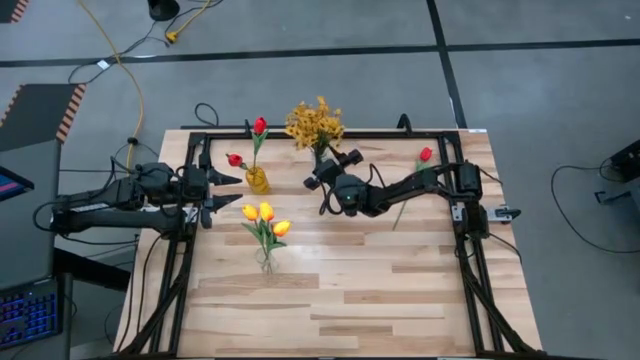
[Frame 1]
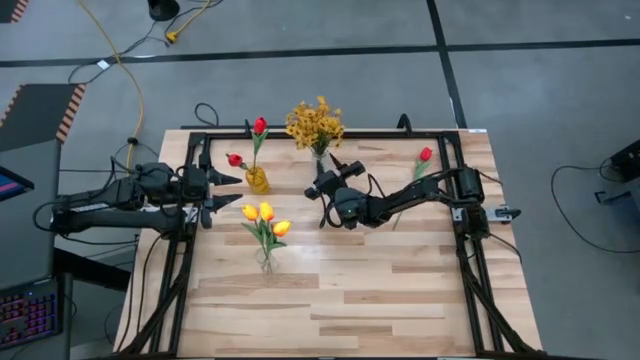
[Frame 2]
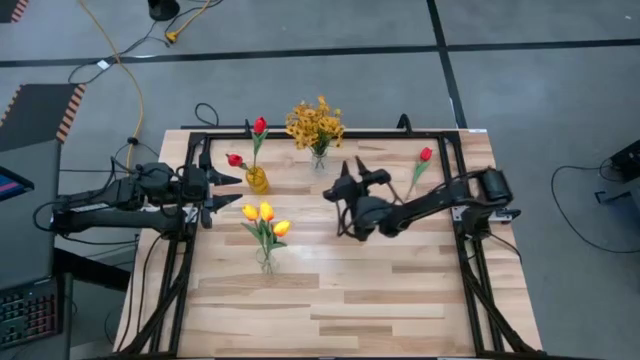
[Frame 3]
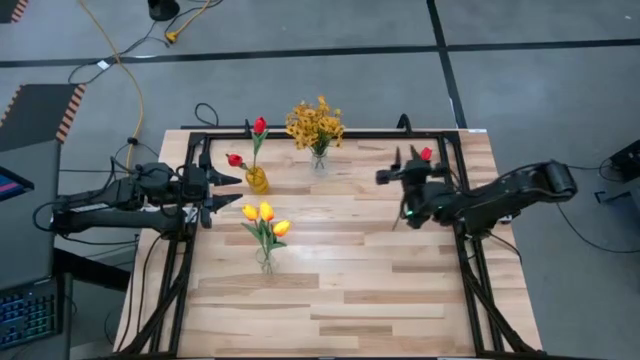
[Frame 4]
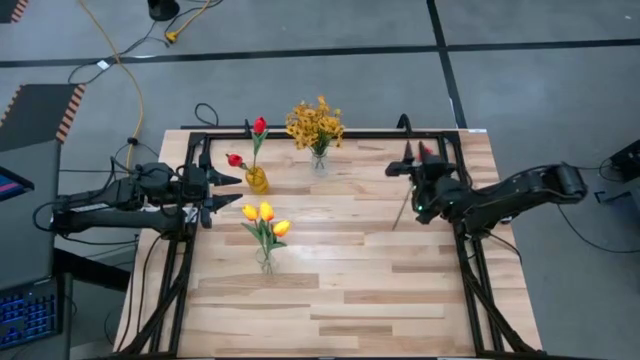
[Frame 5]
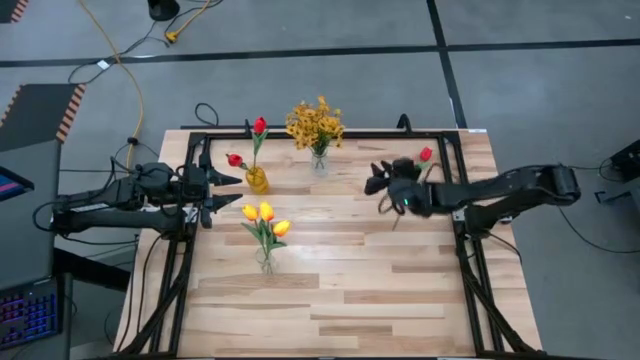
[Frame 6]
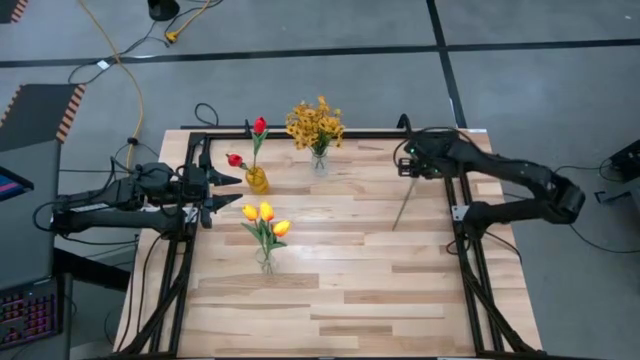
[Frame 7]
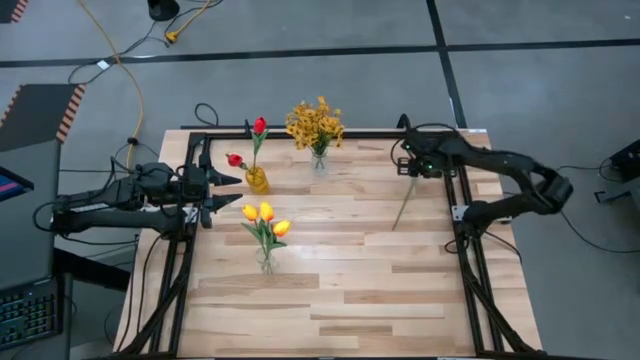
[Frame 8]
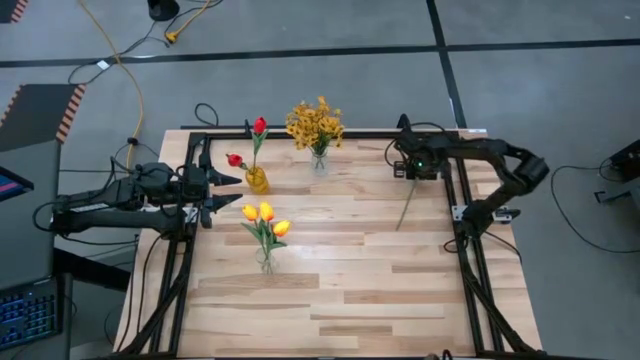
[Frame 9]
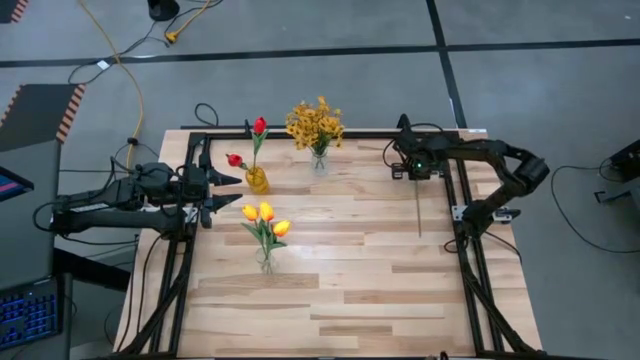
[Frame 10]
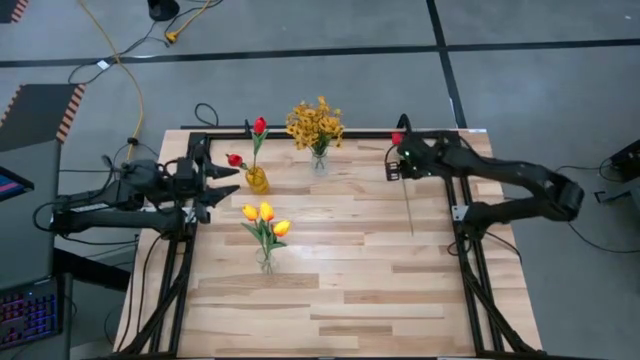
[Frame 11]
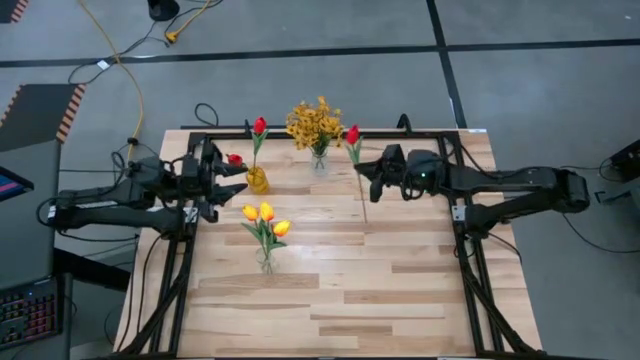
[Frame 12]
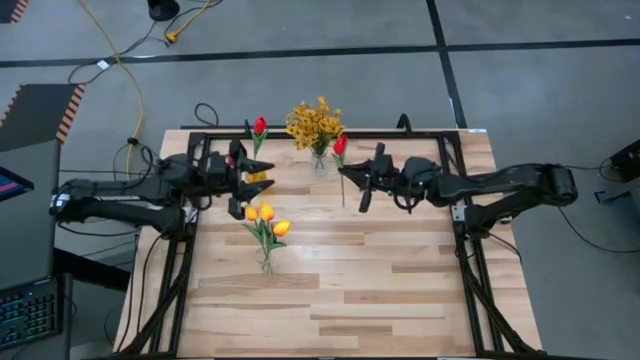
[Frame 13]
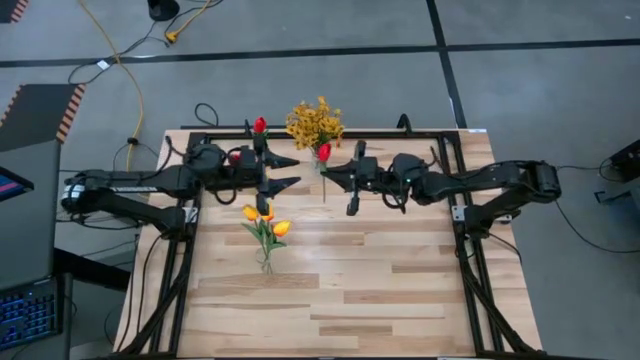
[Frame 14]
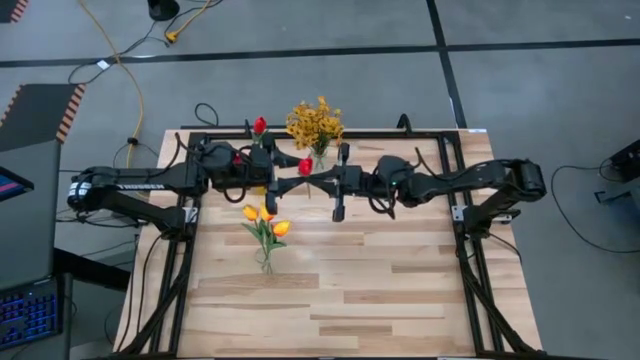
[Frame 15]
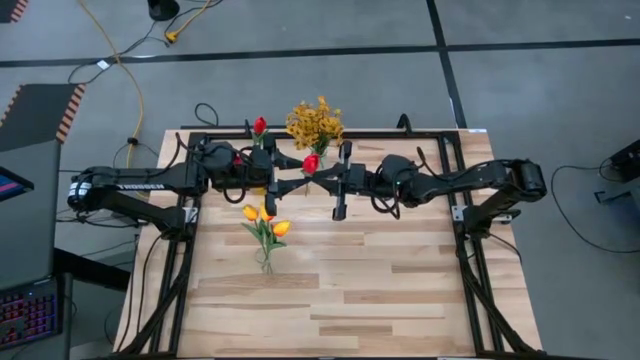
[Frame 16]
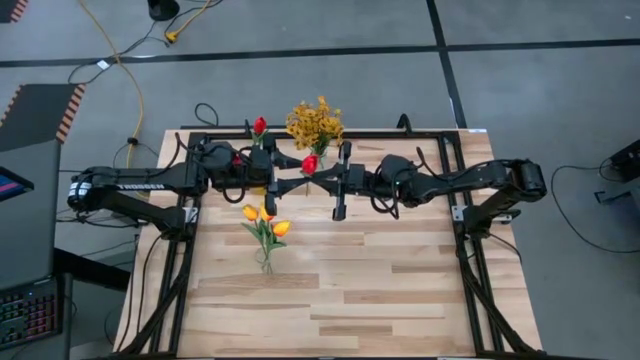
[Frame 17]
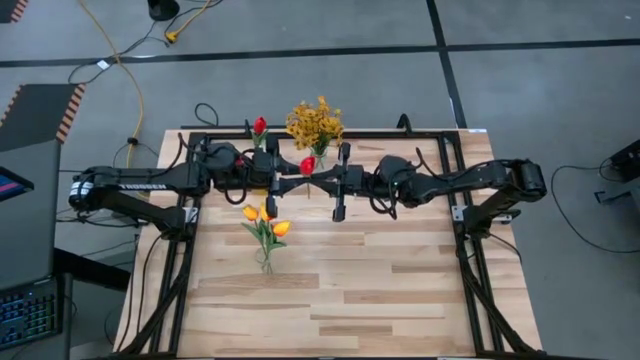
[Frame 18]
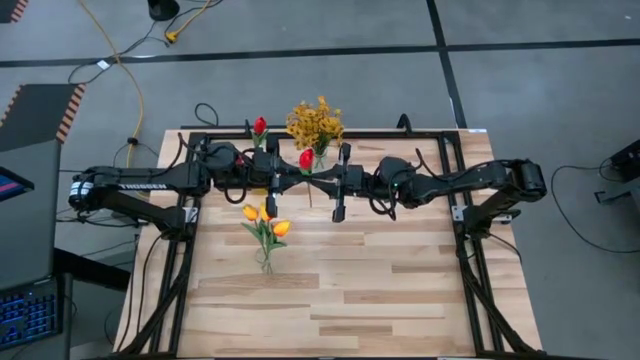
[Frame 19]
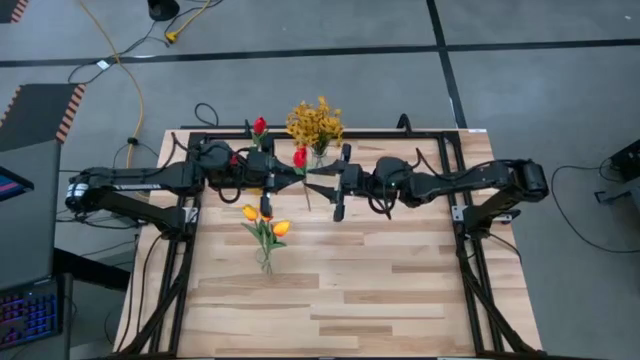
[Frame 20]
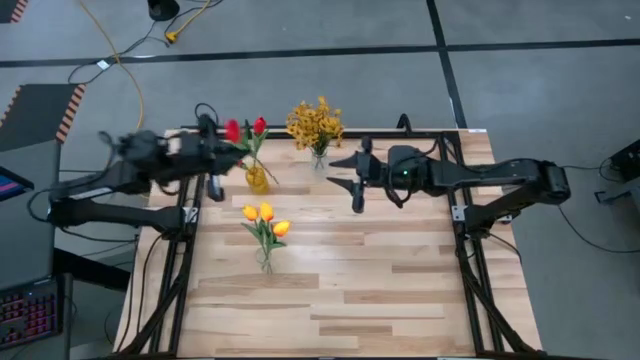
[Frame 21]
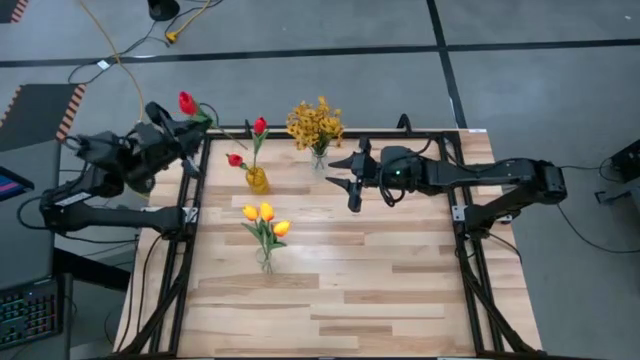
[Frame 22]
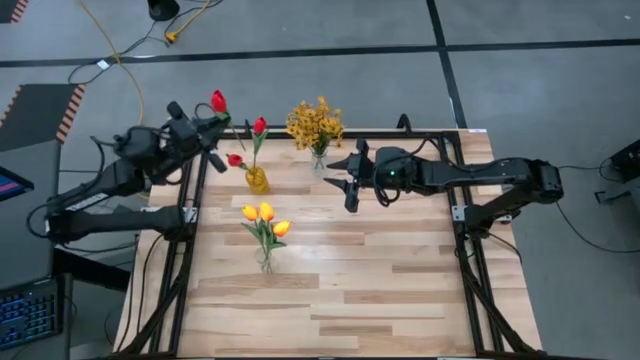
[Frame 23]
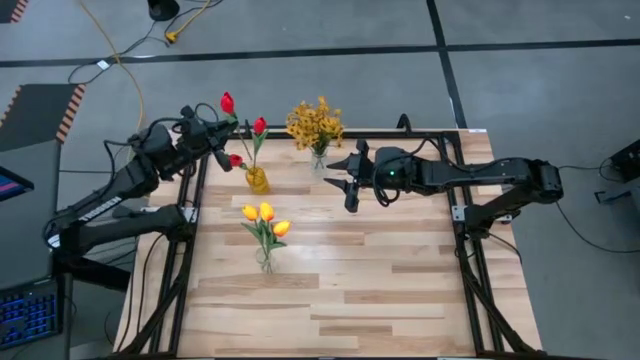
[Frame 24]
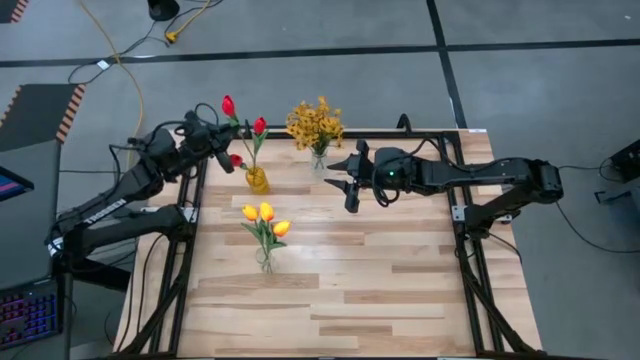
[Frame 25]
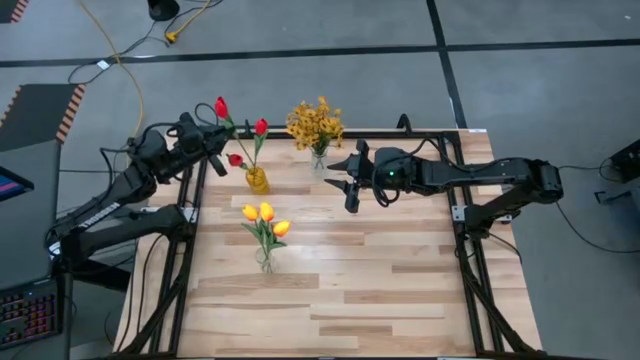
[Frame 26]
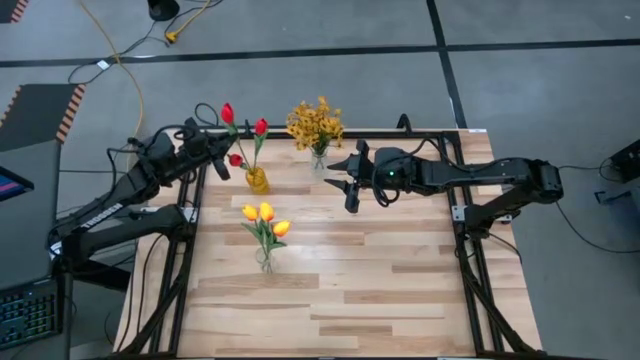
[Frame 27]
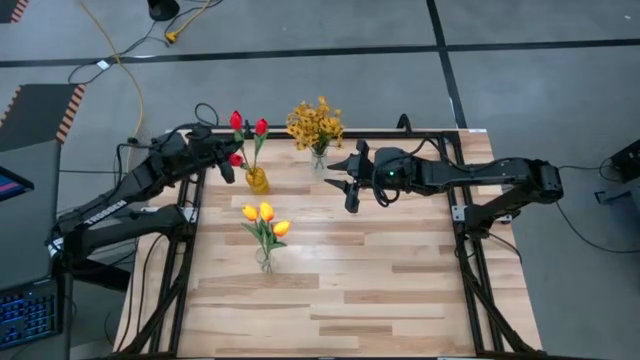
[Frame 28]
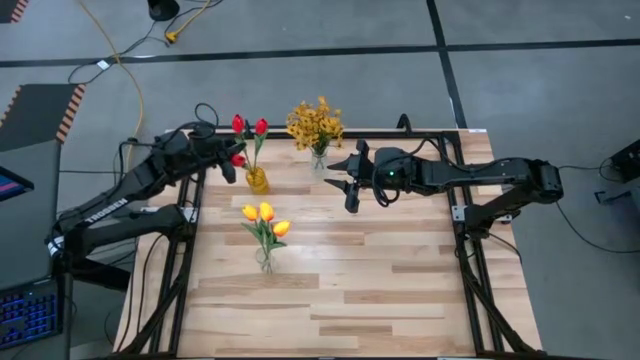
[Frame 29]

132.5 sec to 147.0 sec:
Task: Sort flowers into vase by color
Put the red flower into the yellow vase

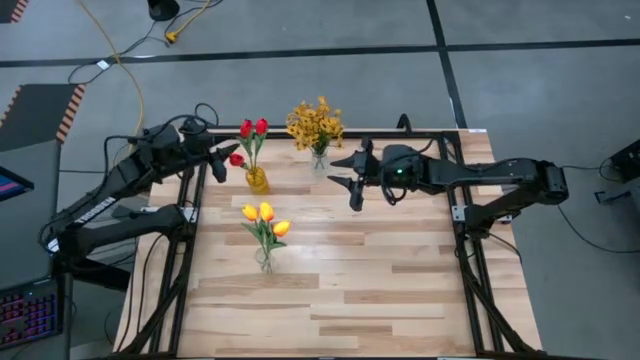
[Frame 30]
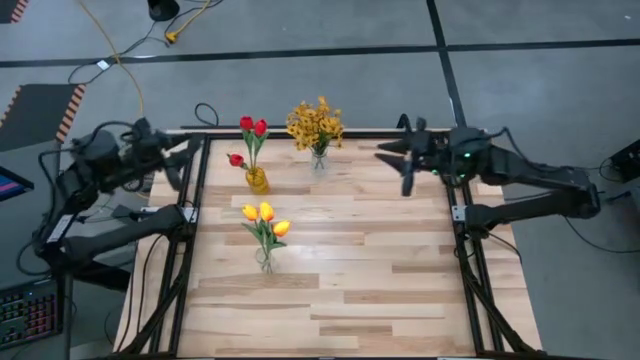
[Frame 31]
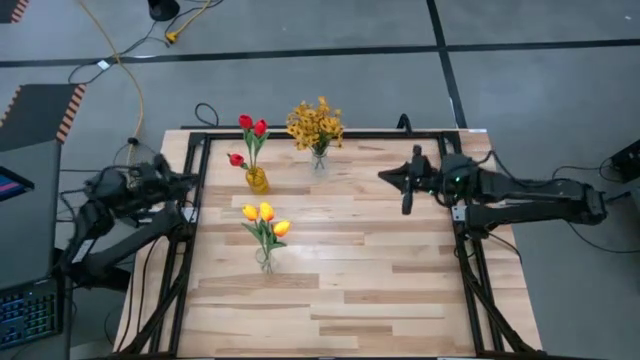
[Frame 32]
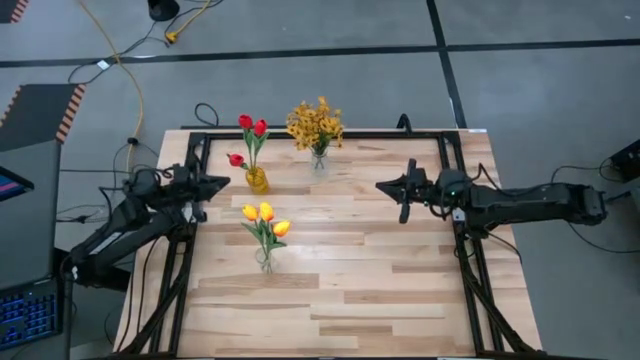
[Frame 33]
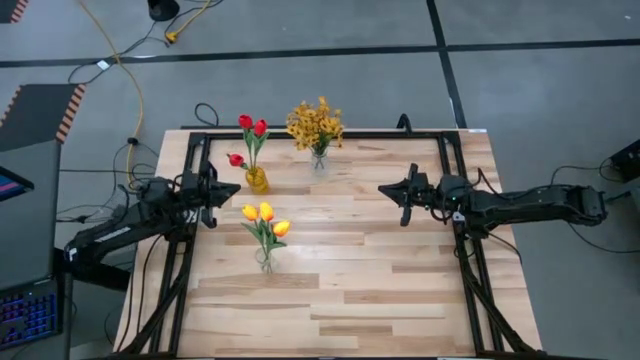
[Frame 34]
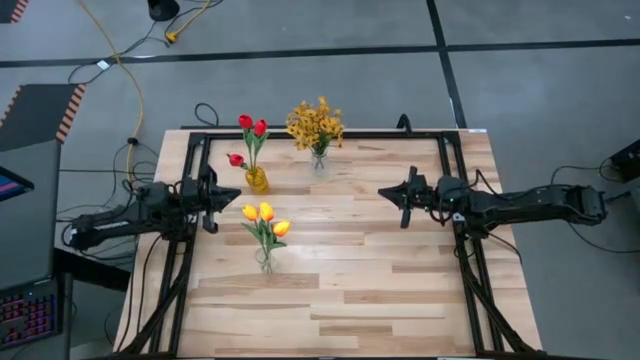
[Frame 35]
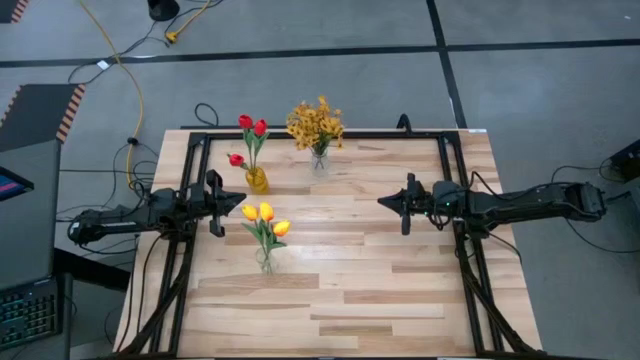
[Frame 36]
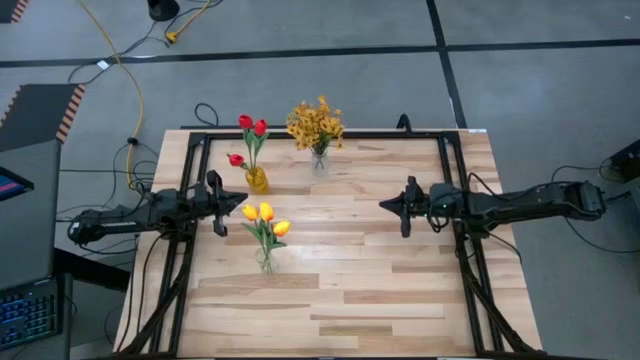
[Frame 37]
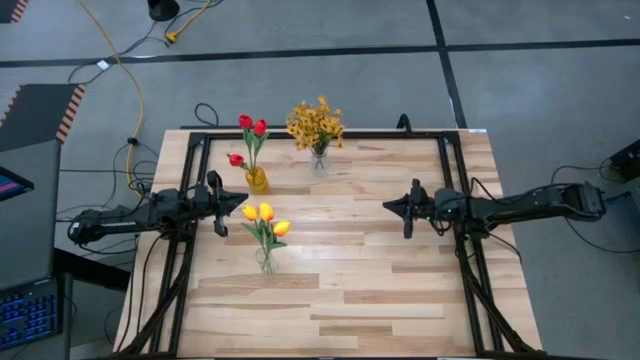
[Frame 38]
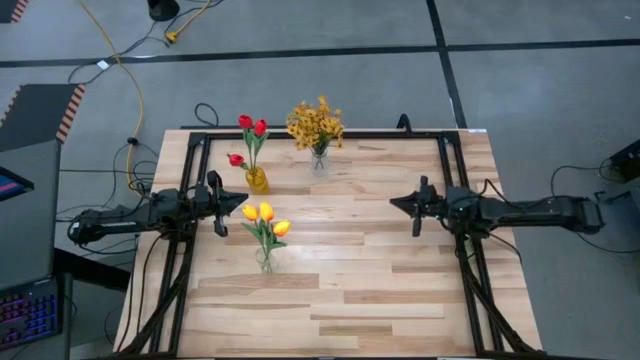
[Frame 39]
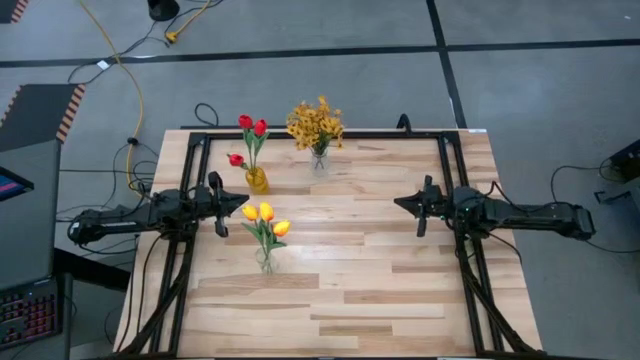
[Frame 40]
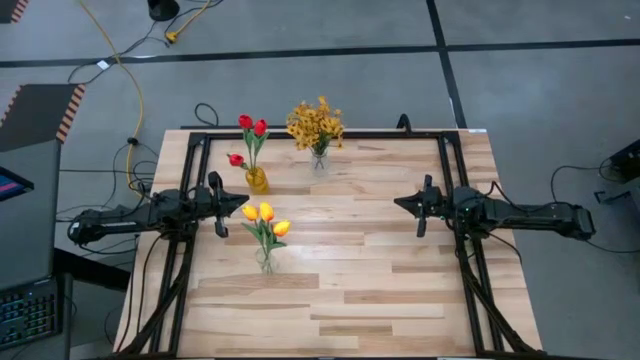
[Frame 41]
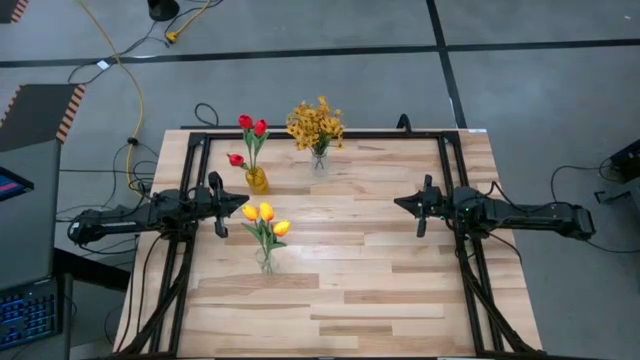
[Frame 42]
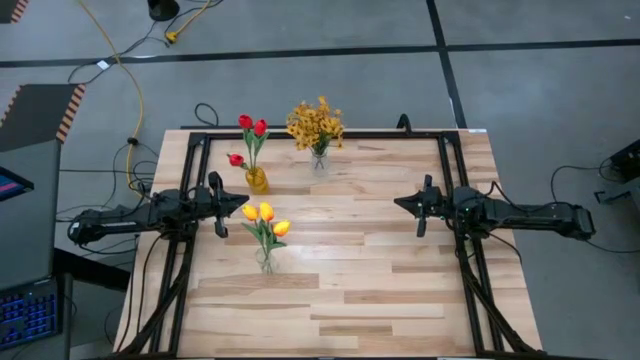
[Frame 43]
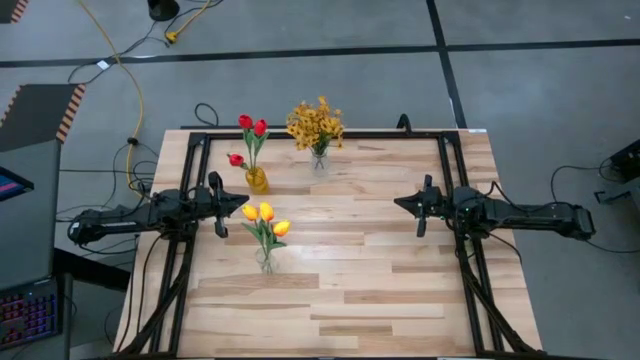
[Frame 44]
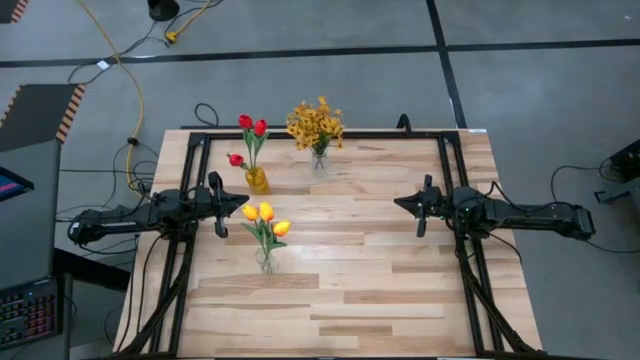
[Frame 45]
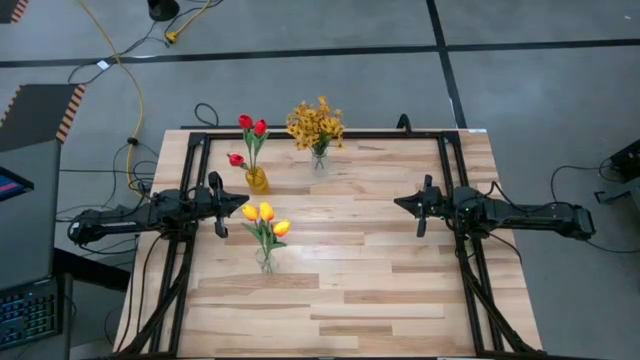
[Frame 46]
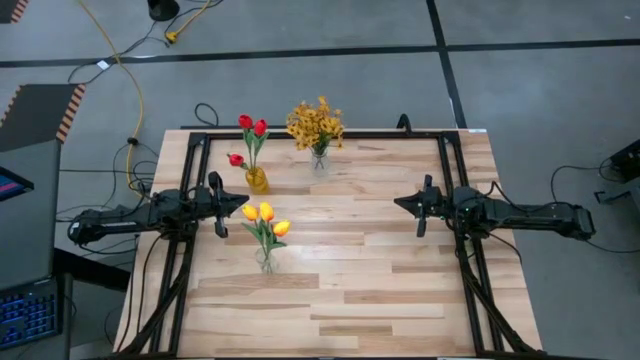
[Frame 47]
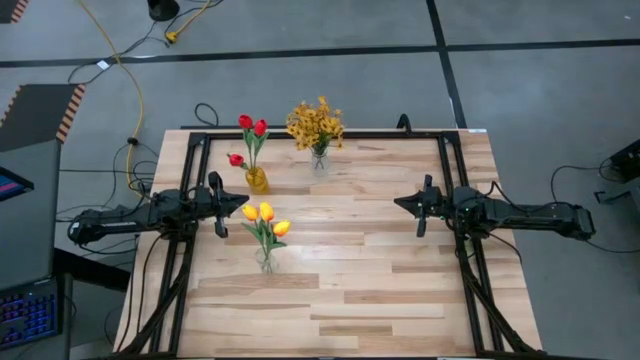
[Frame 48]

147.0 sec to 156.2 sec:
Return to Home Position
